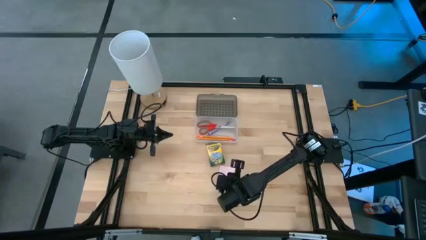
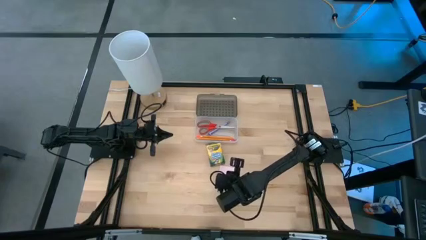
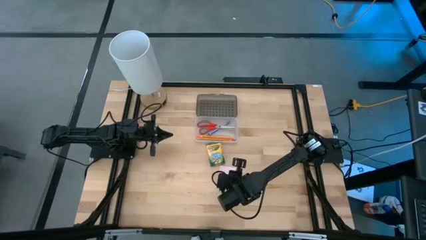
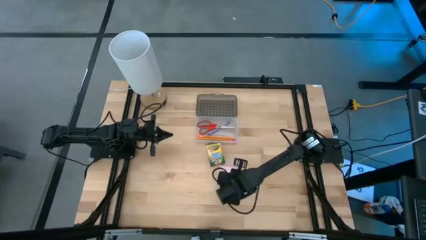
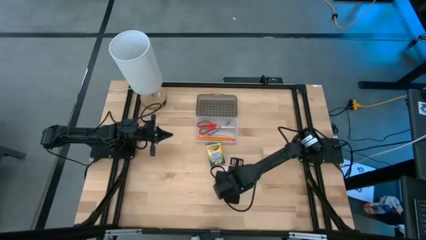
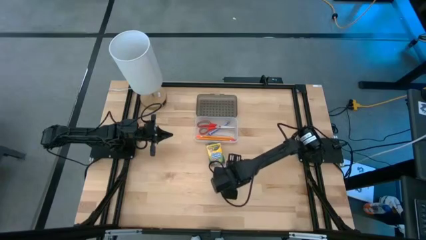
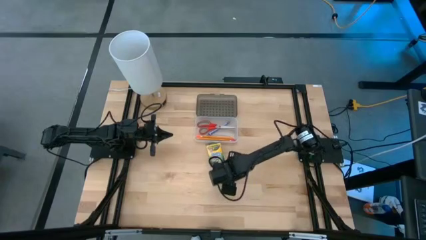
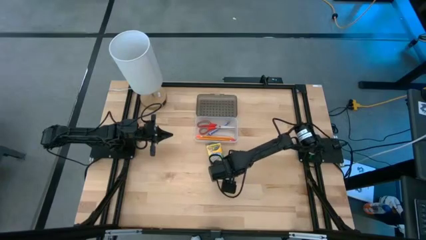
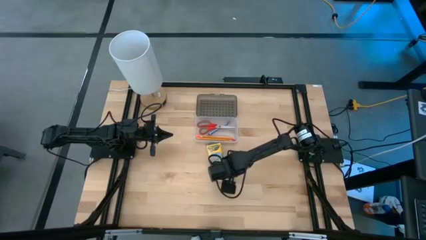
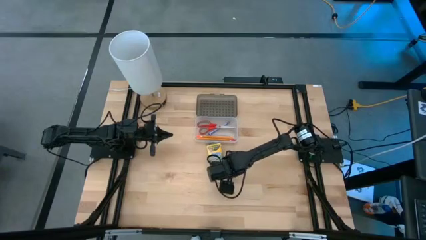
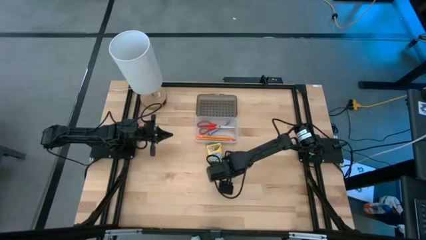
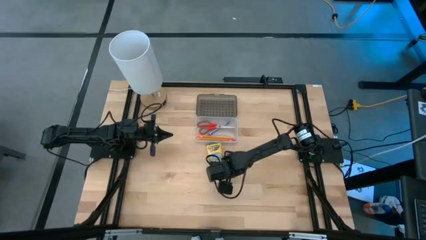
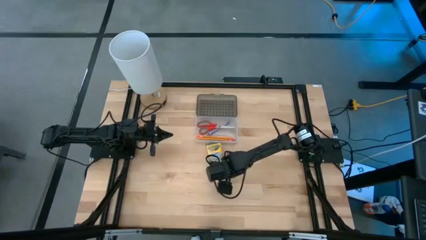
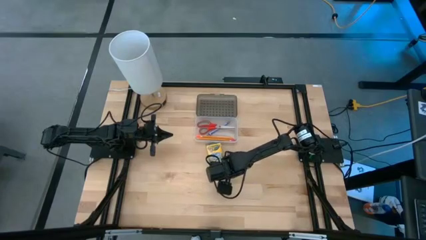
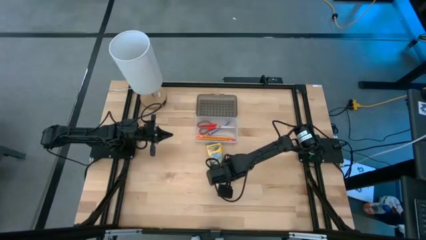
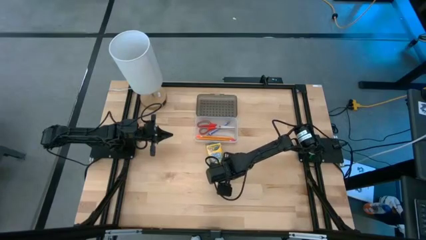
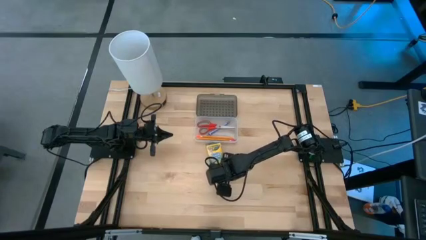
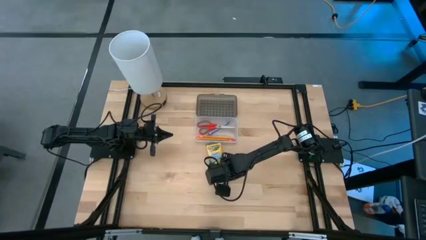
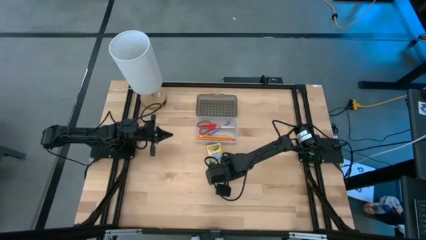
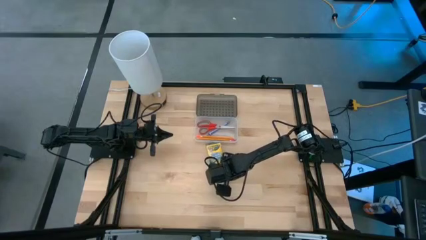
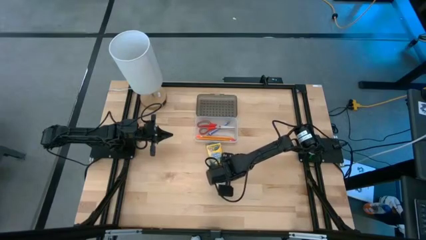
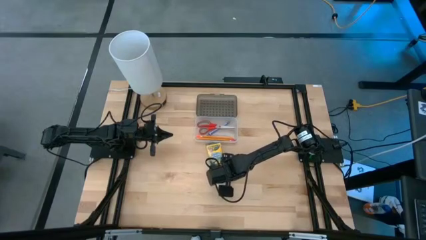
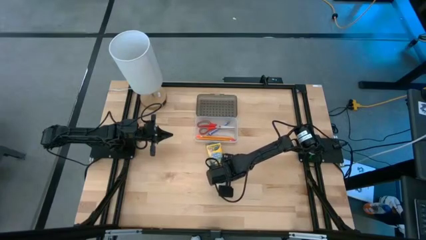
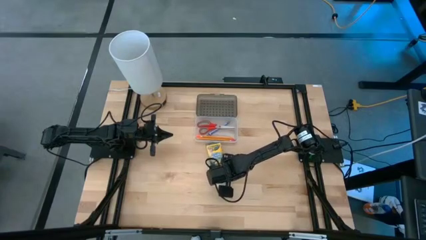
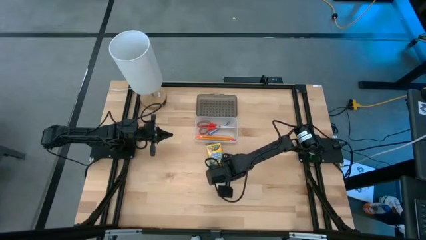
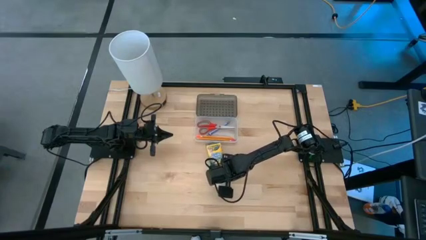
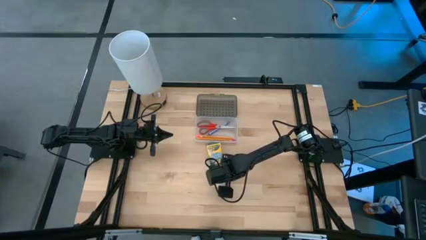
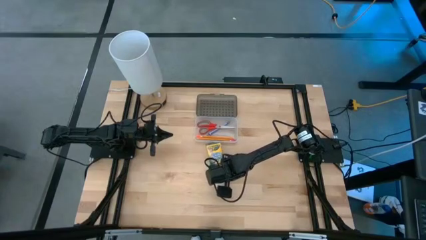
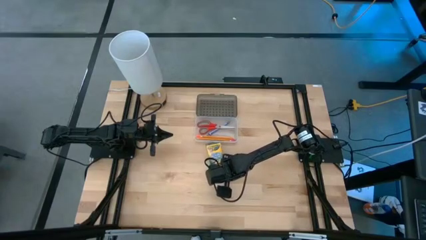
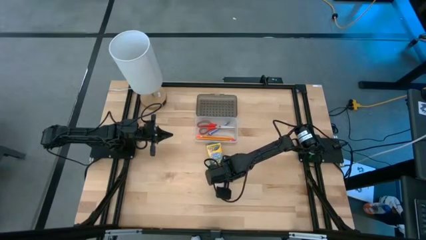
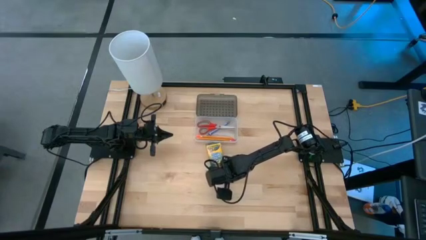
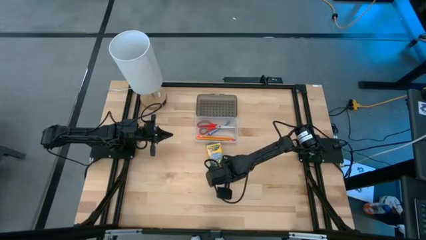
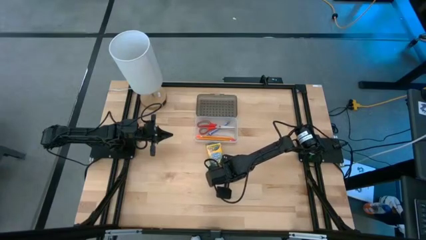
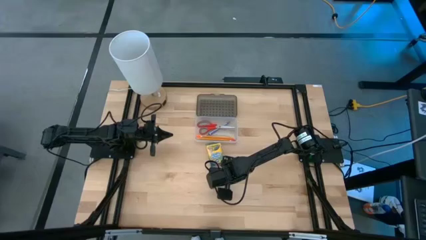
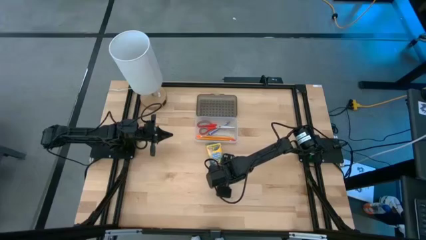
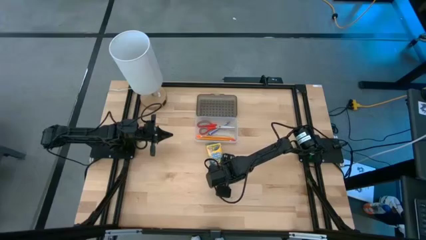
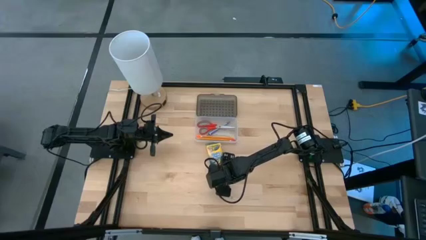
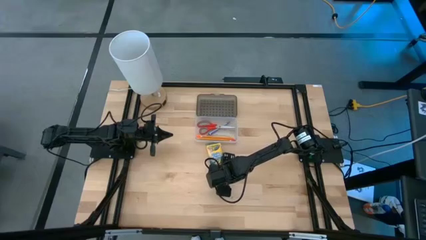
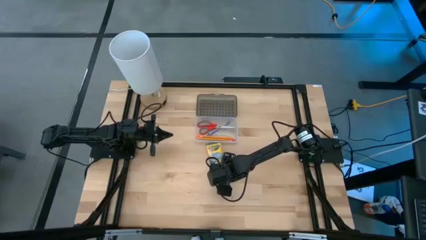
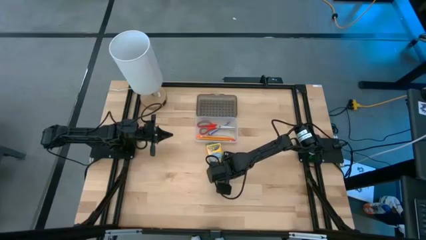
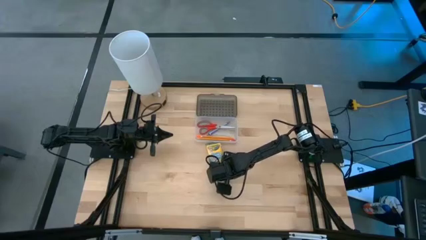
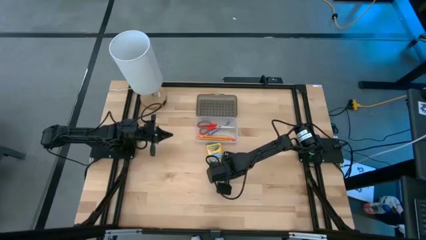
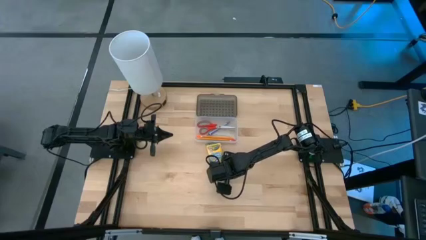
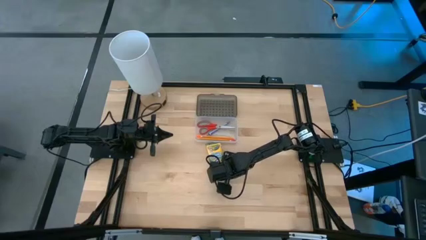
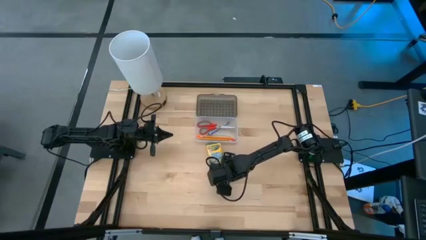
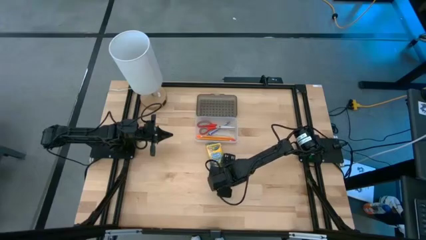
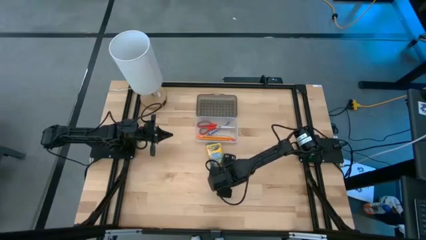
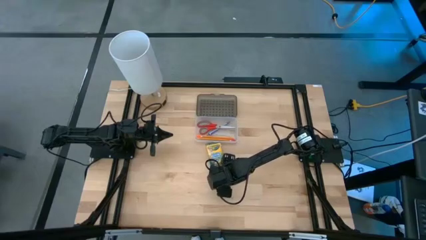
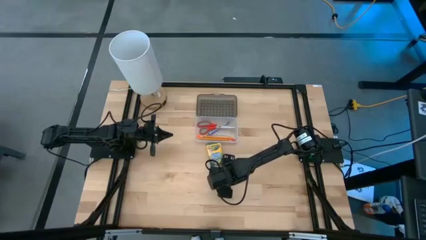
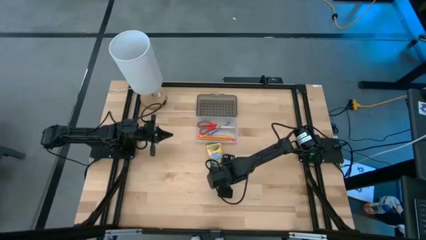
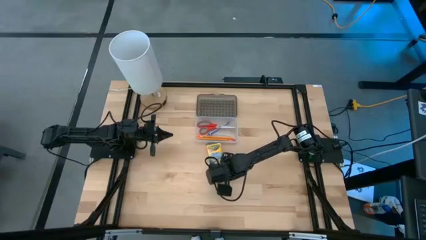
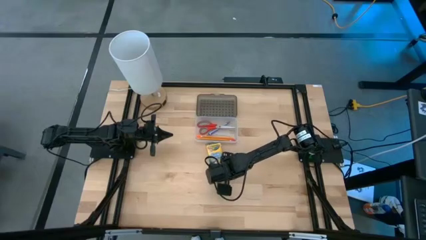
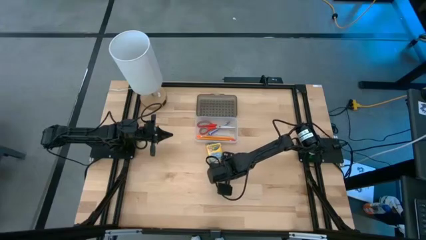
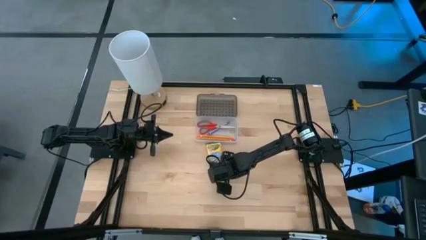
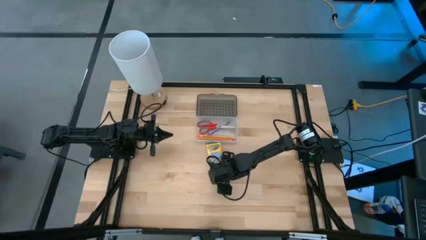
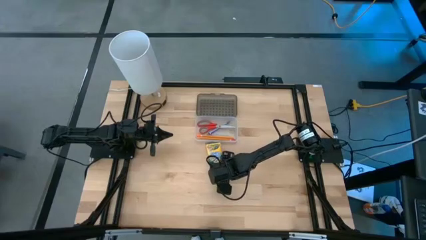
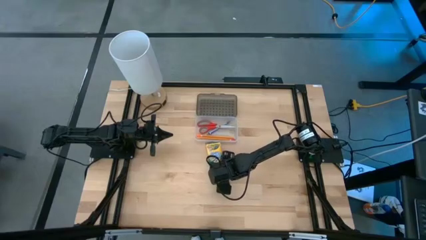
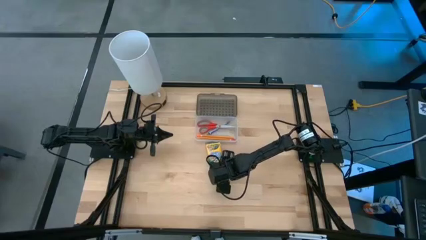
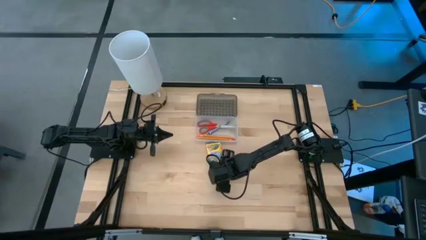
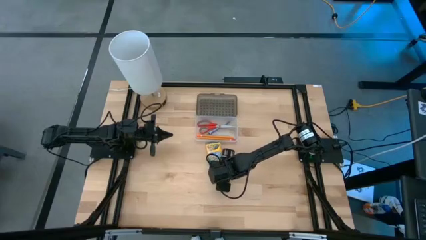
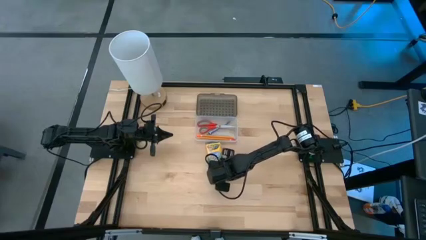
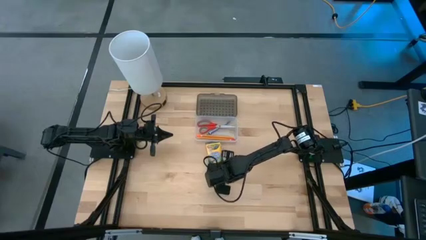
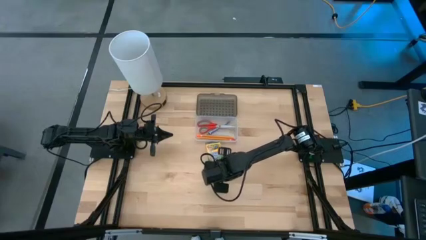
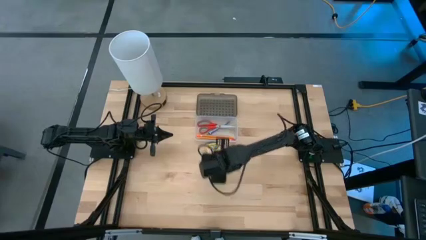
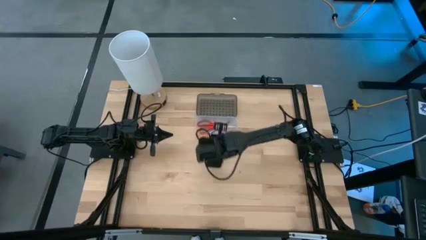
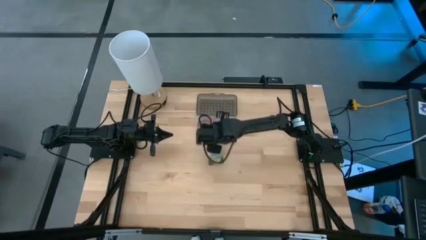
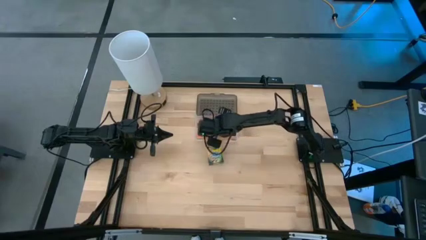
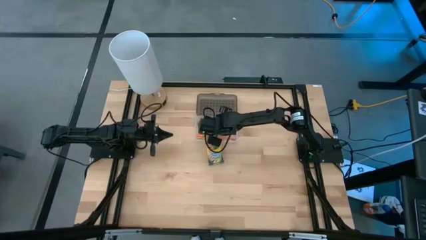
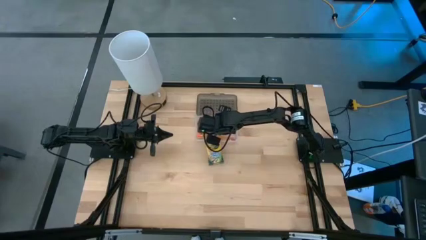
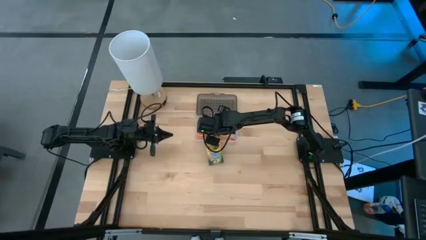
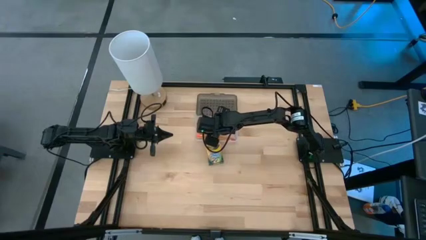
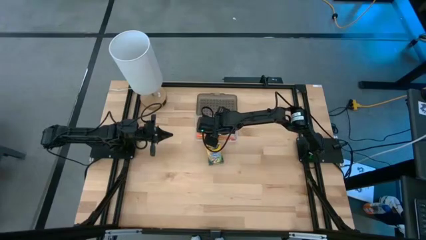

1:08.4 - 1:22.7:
Task: Pack school essentials
Put the light pink sticky note into the gray supply box

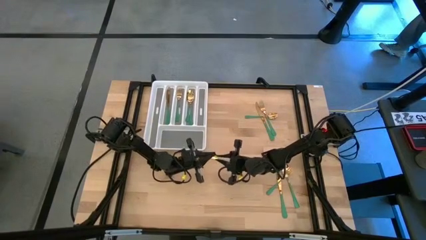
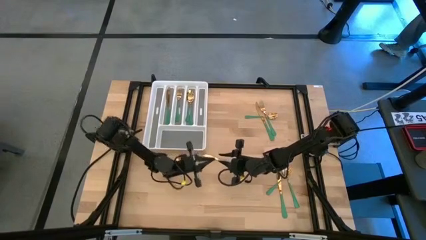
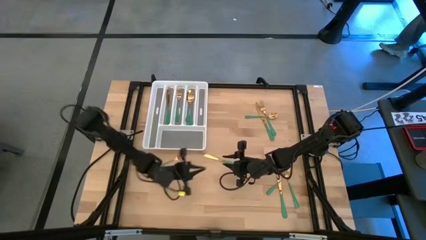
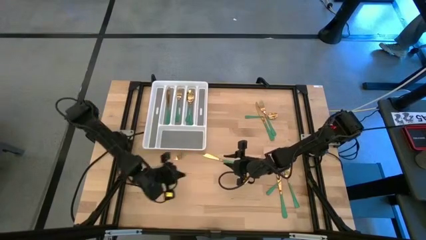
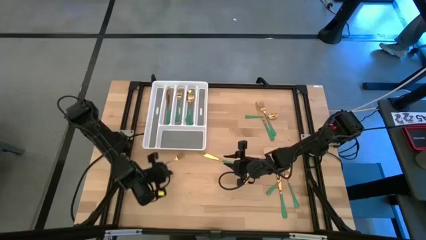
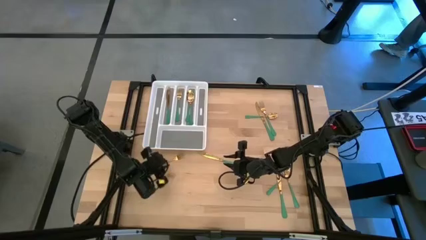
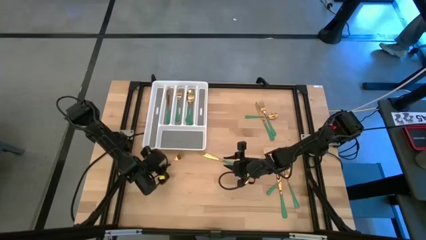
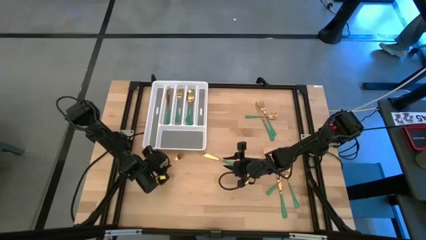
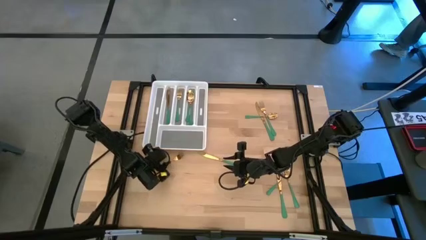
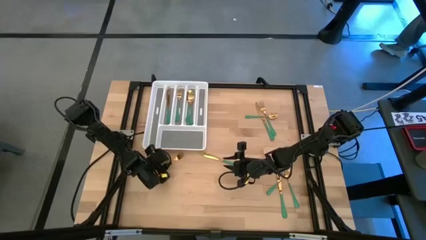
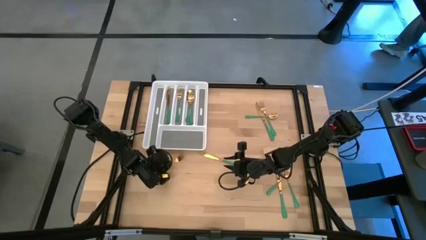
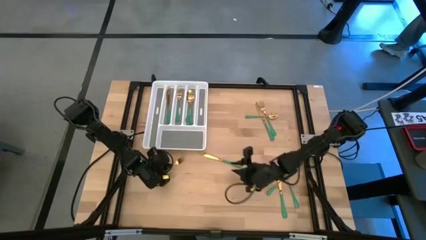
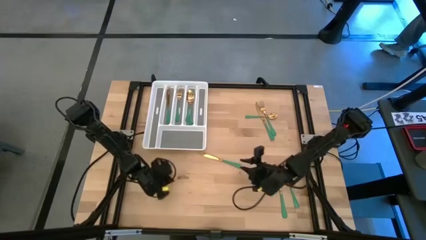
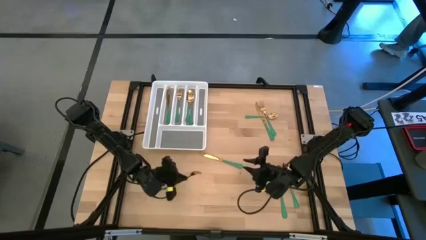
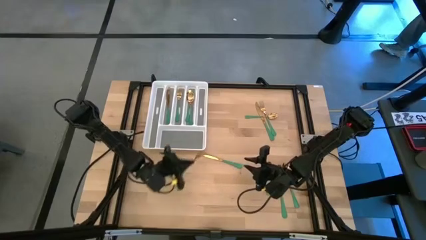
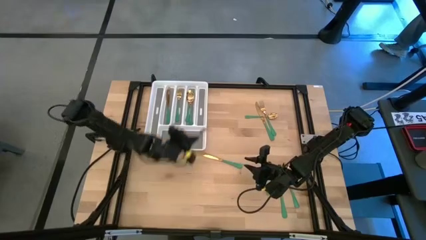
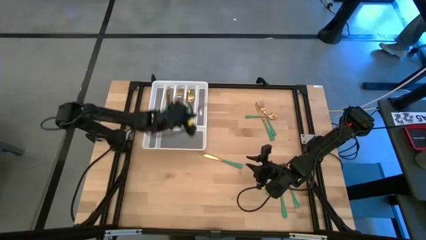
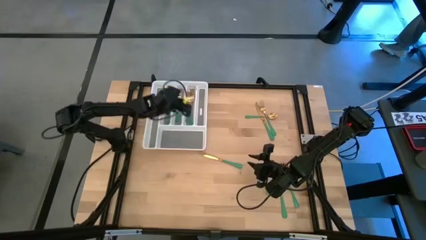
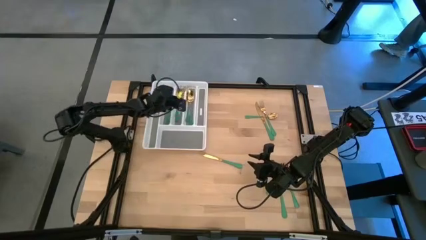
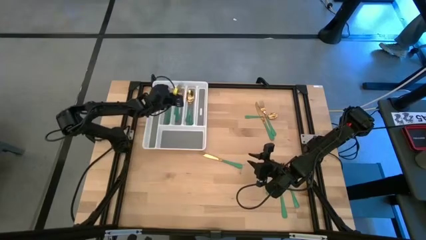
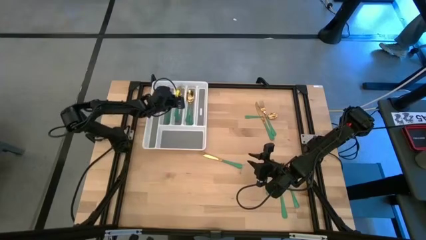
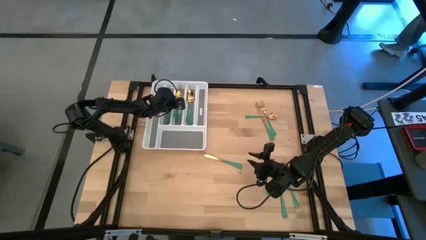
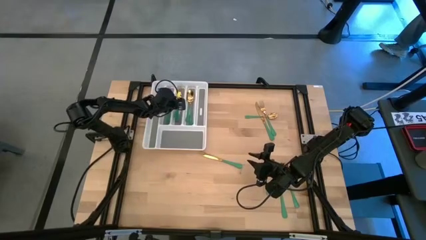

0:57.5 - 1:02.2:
Task: Sort silverware
Put the green fork into the white cutlery tray
